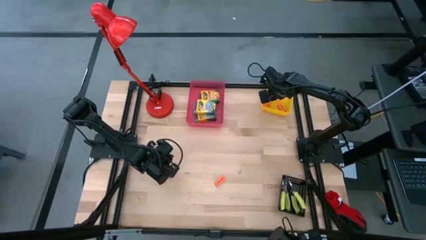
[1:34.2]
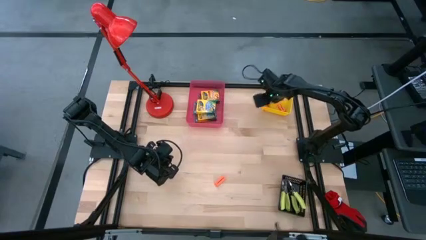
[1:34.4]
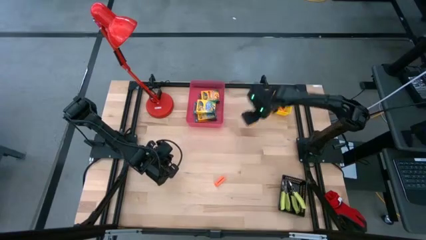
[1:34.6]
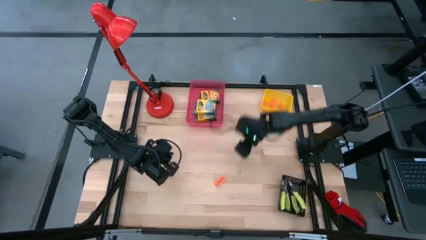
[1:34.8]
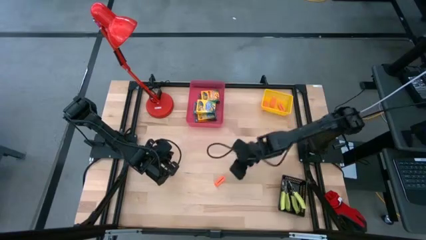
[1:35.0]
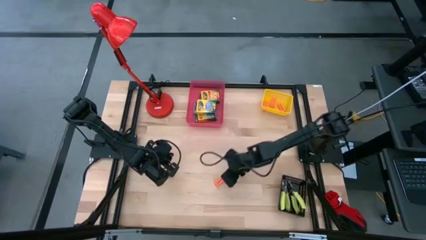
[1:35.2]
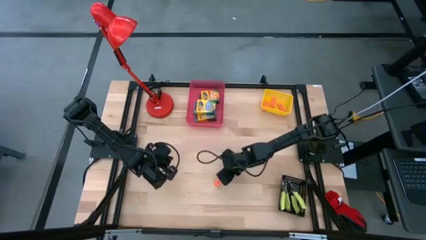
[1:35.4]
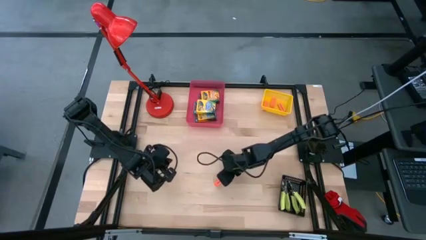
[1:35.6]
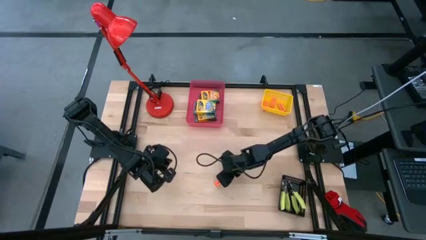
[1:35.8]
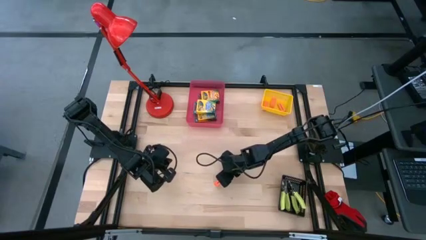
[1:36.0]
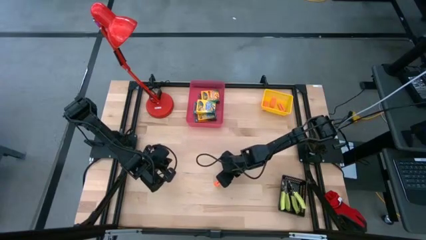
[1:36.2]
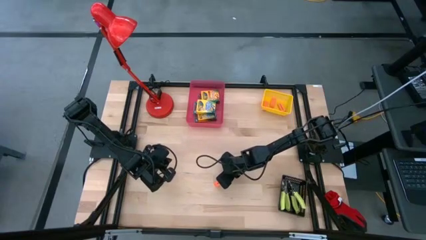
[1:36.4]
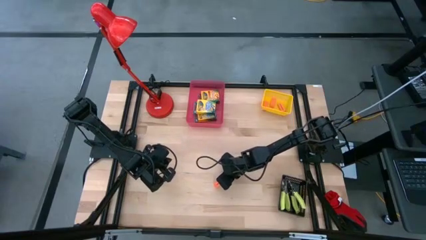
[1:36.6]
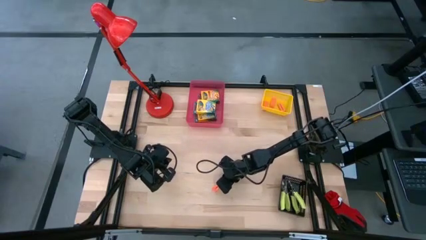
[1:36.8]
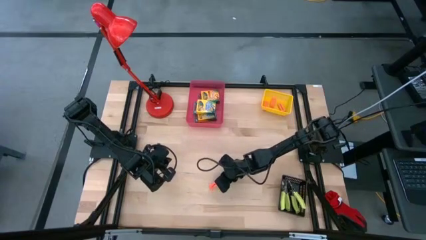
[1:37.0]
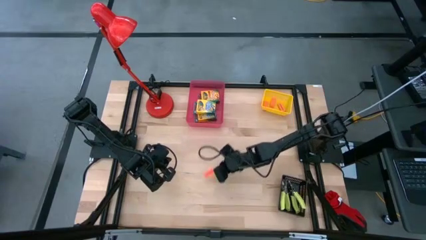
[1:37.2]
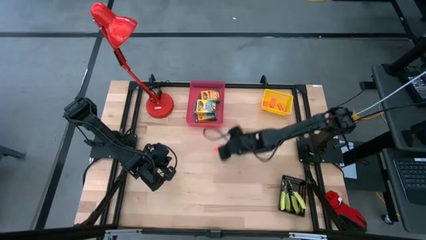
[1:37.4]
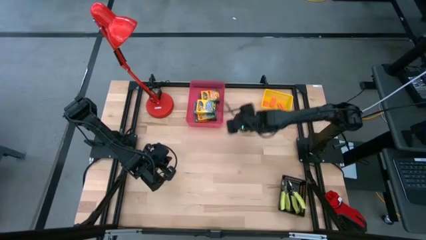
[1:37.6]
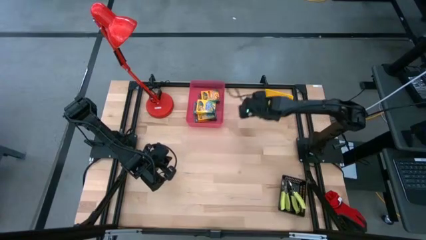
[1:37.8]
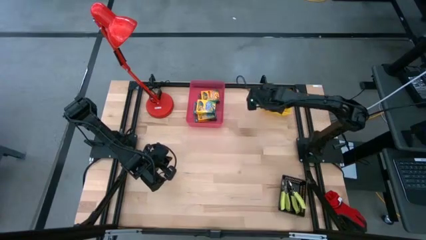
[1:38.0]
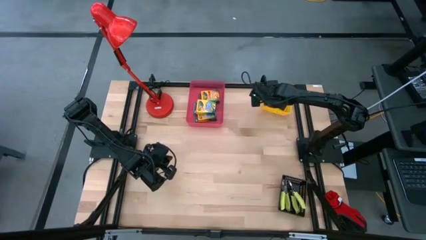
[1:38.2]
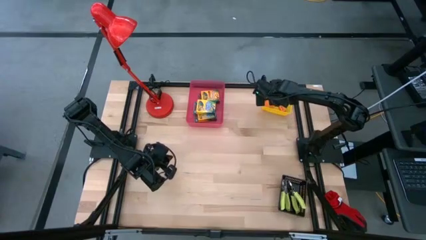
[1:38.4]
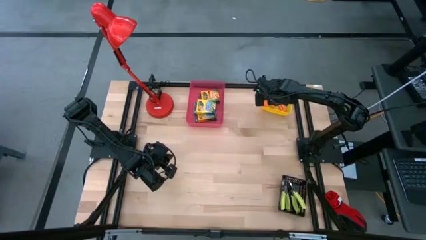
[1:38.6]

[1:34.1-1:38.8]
Task: Pick & Place School Supplies
Put the orange eraser into the yellow bin

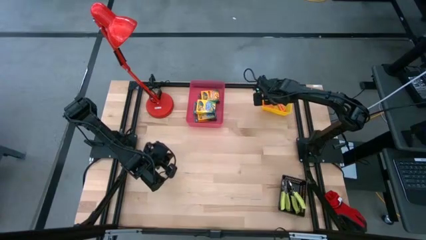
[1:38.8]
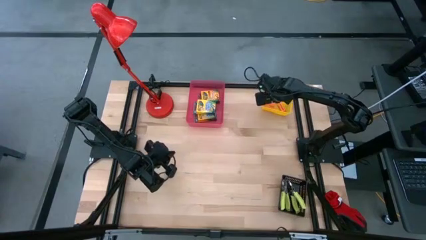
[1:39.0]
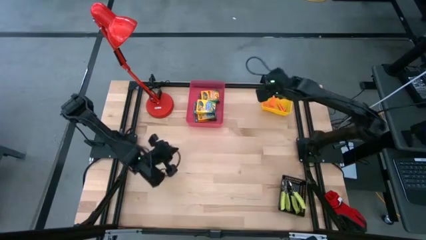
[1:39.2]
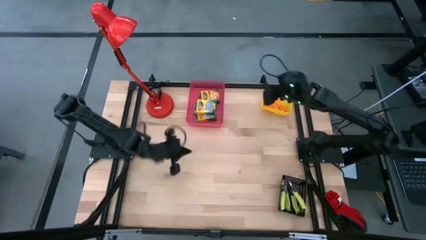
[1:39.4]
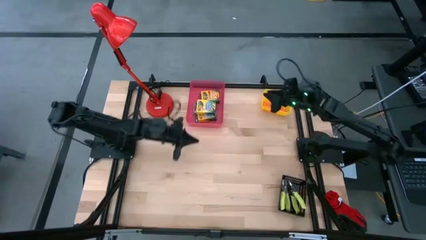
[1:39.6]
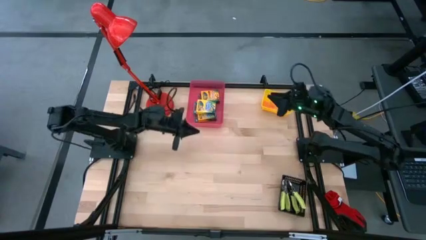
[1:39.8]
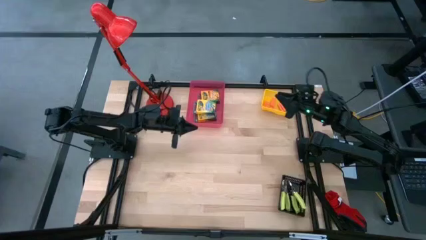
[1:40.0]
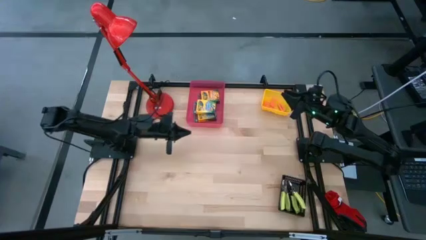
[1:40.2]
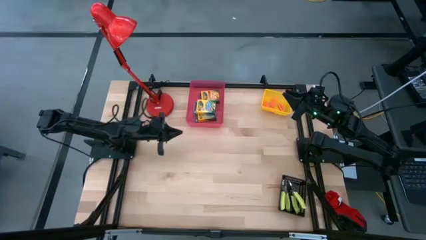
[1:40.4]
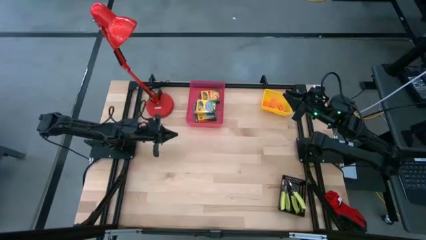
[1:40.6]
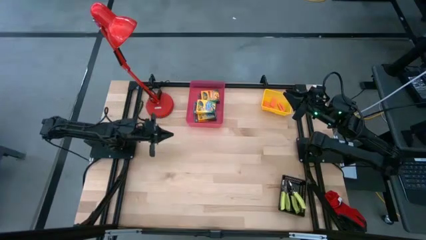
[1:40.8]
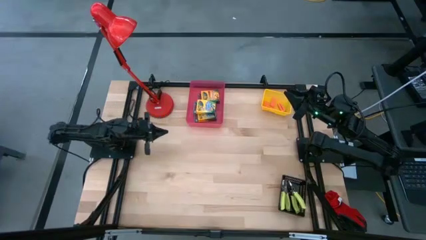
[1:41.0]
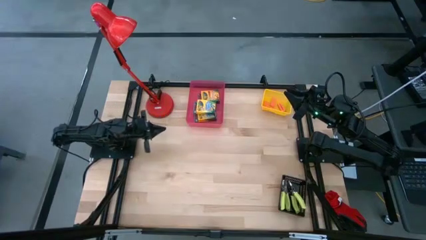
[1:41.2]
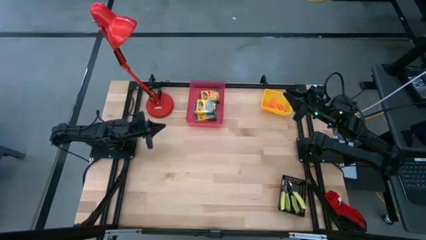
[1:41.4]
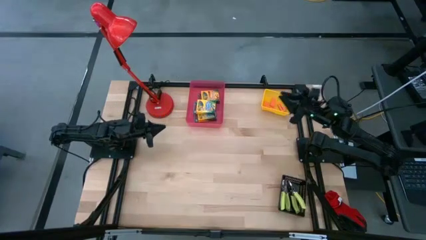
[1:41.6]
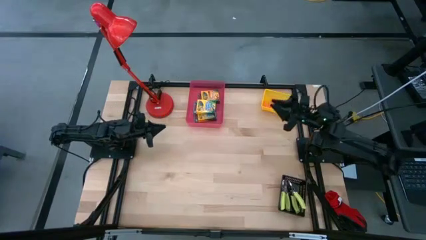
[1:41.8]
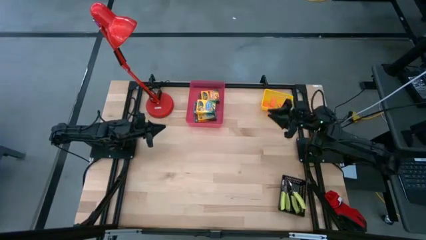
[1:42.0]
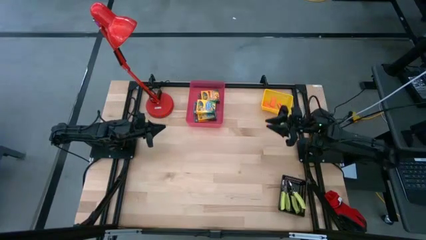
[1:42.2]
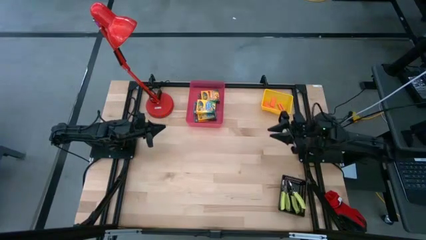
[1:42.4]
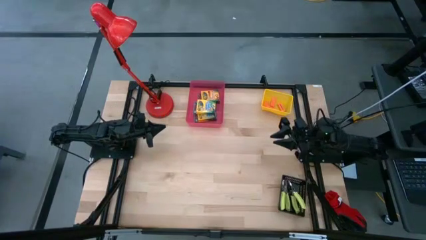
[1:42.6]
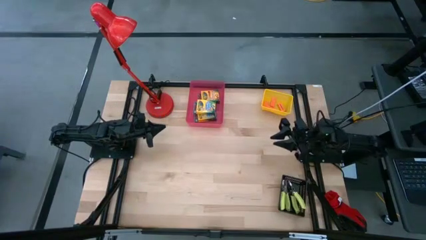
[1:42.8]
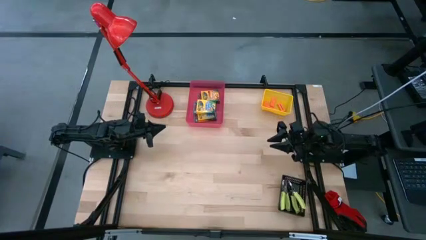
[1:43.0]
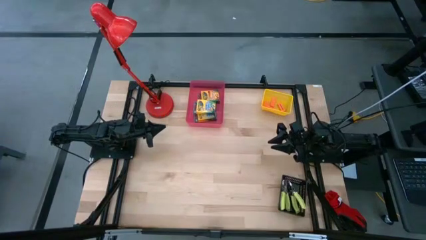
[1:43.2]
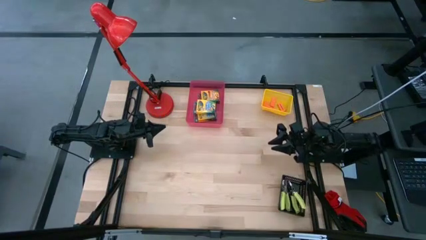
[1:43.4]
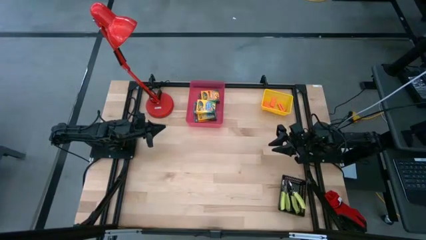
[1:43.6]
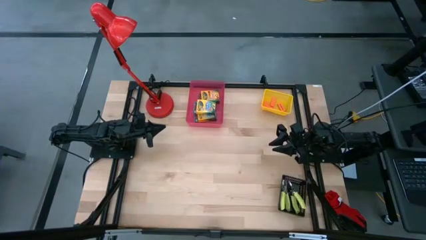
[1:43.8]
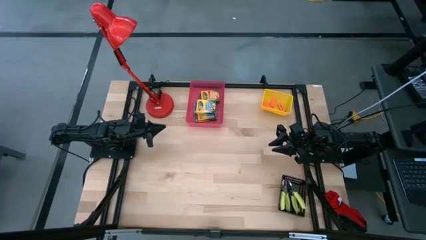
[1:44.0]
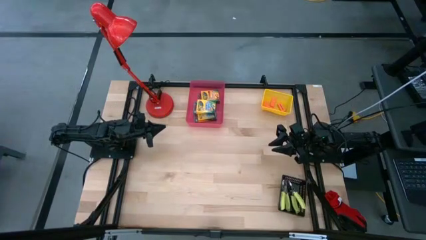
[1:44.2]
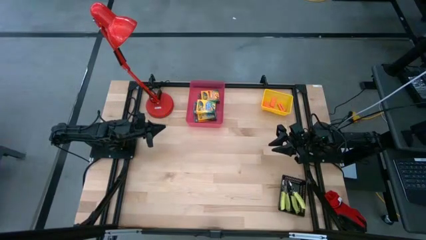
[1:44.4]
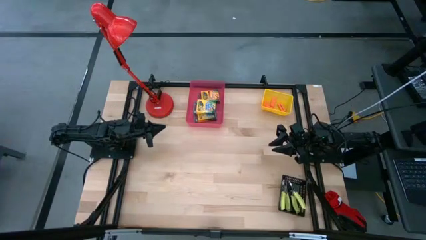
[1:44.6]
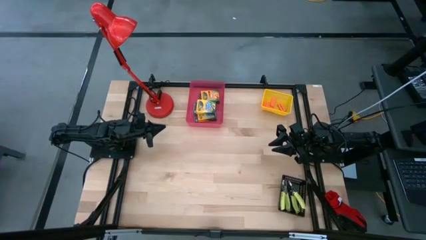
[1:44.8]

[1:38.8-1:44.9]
Return to Home Position
